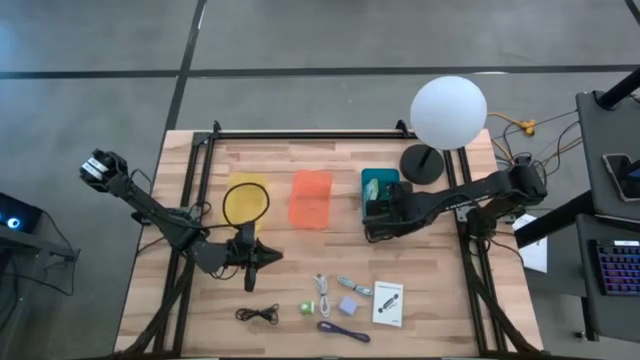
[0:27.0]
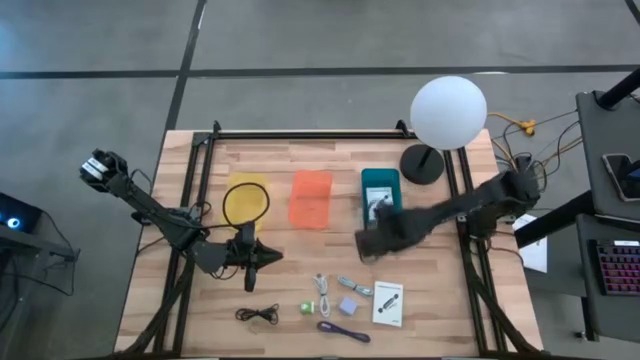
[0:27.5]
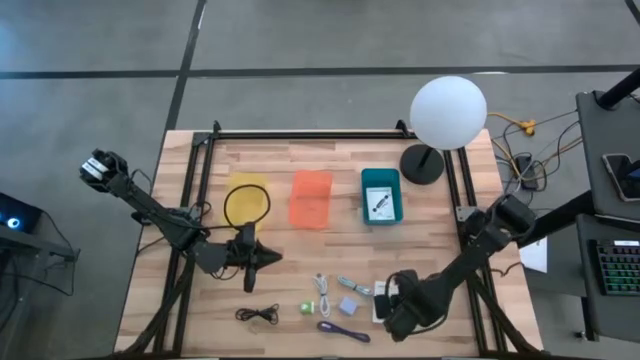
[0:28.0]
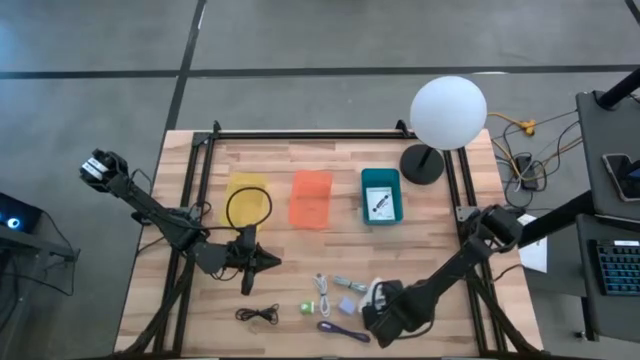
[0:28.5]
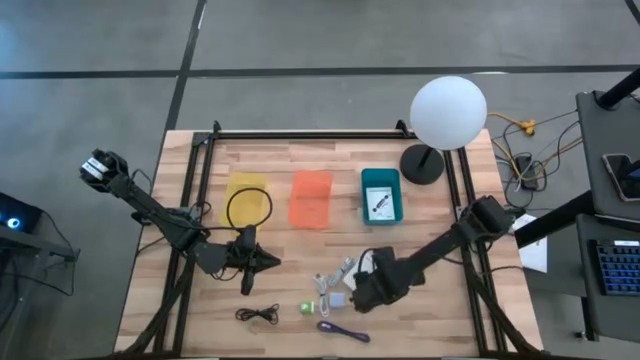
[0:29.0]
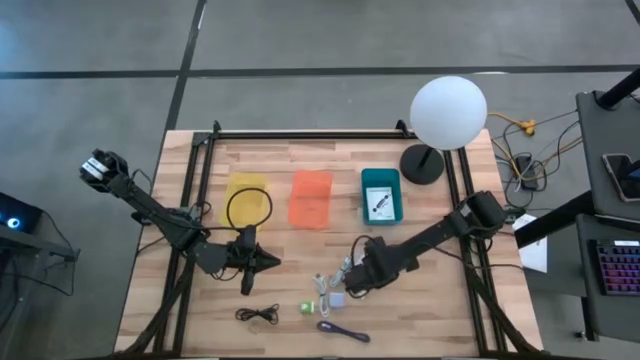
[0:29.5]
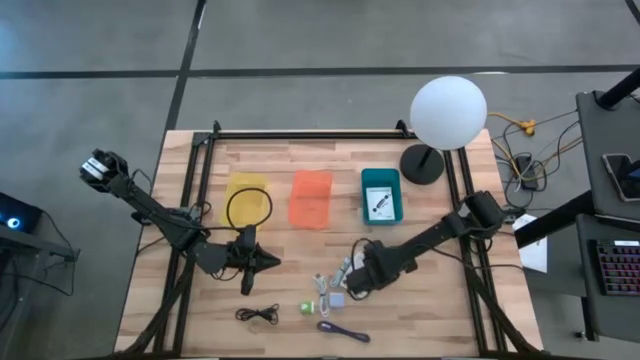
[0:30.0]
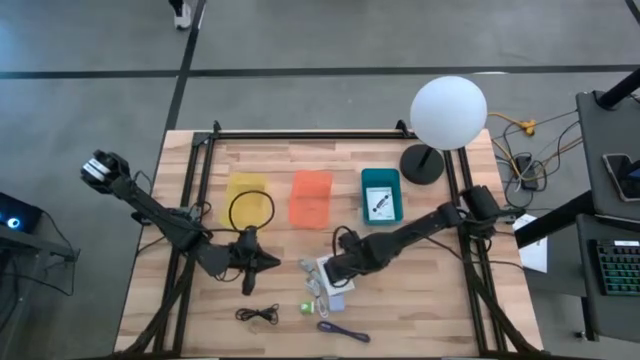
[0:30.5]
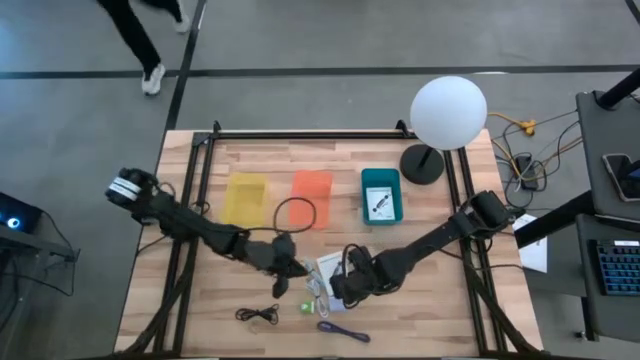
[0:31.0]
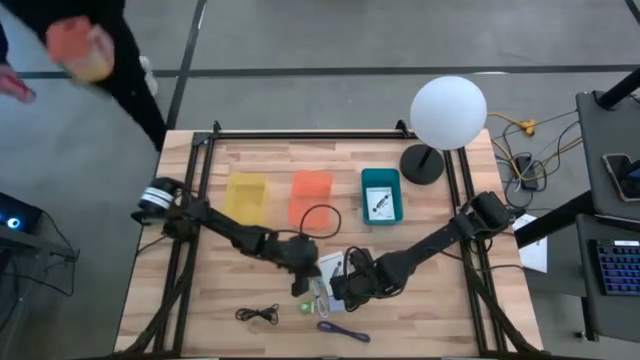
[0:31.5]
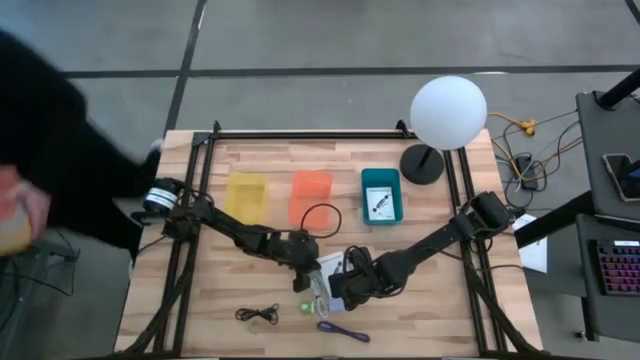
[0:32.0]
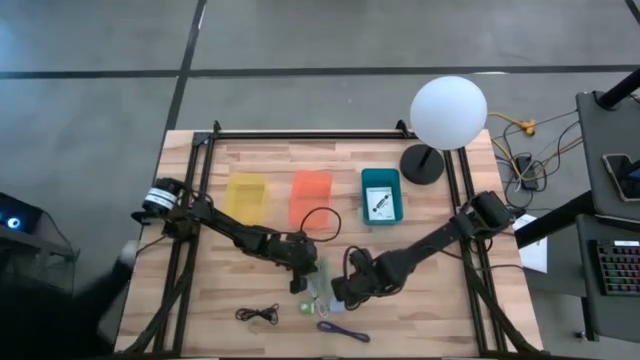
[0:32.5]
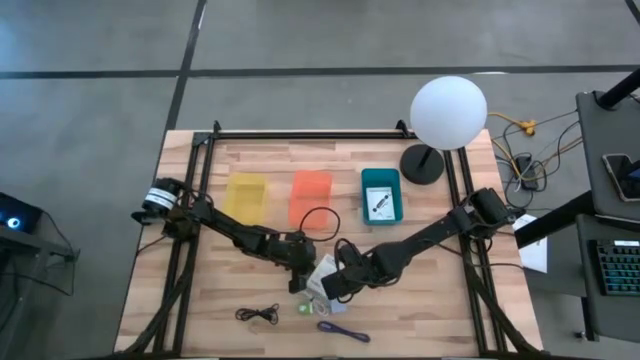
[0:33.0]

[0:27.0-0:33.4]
Task: Pick and place items into bin
Put the white card reader box into the blue bin

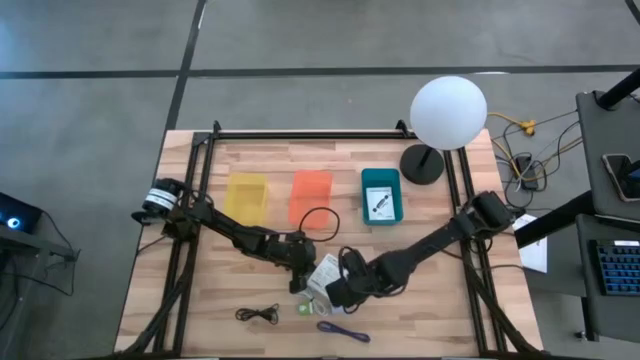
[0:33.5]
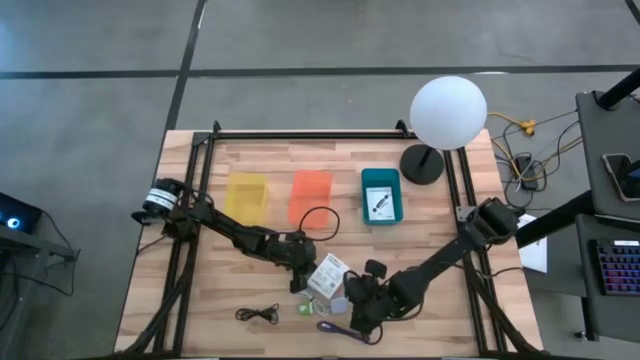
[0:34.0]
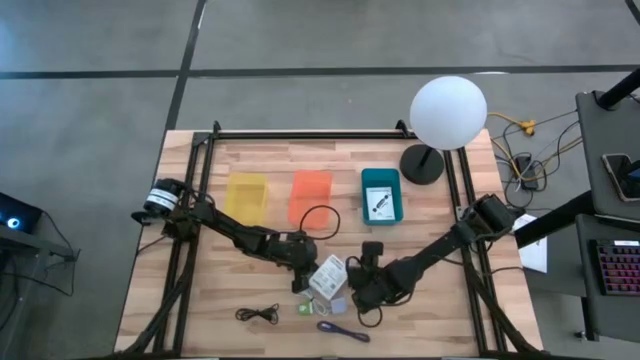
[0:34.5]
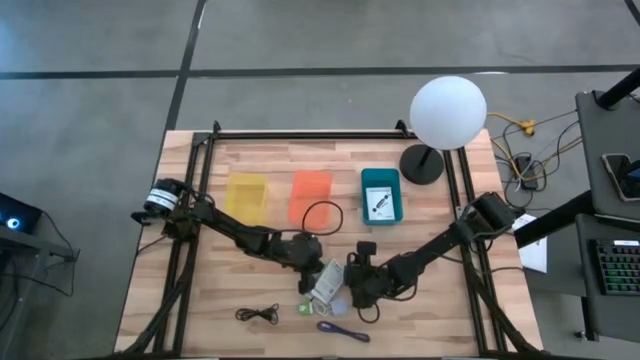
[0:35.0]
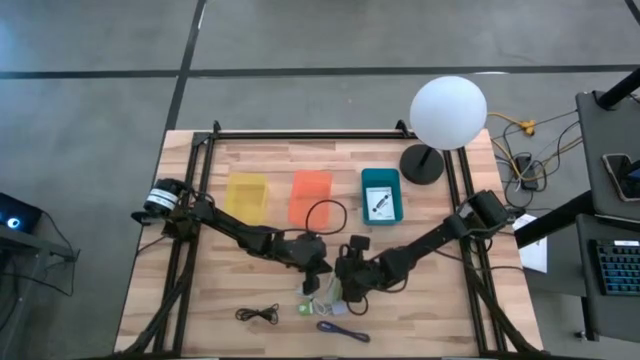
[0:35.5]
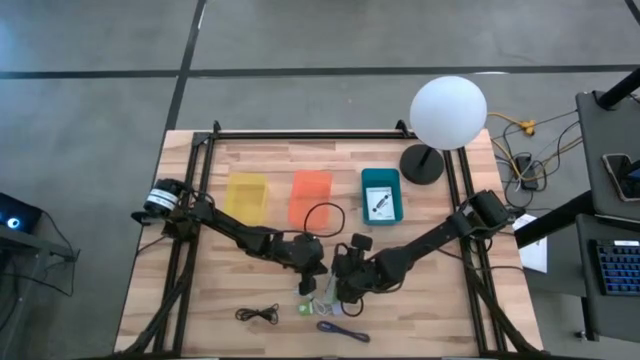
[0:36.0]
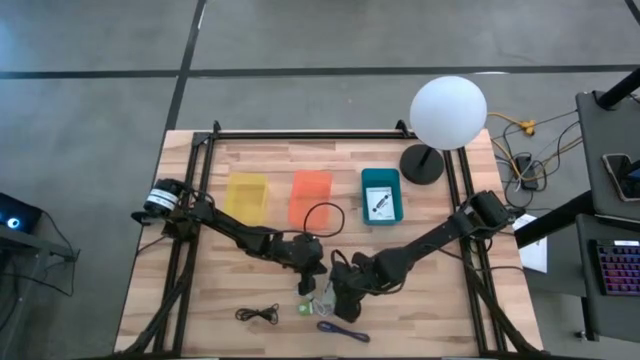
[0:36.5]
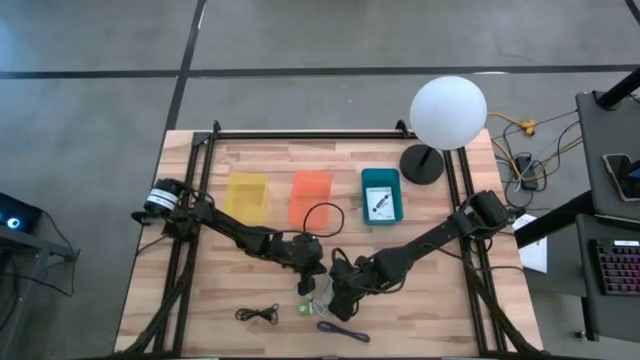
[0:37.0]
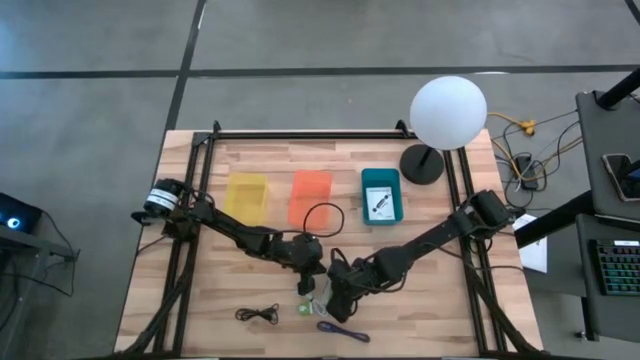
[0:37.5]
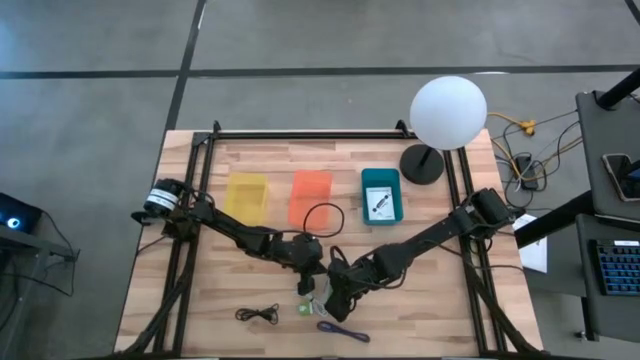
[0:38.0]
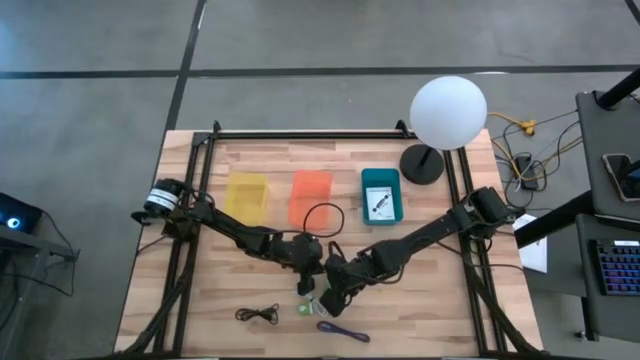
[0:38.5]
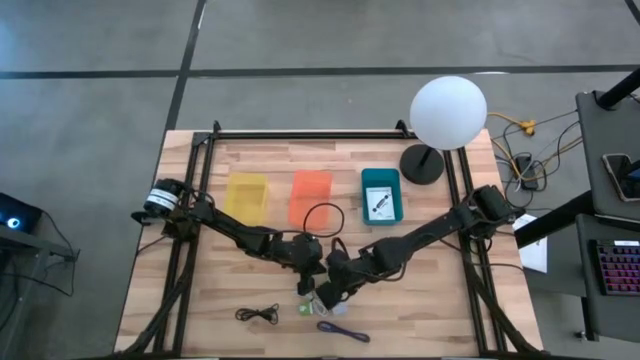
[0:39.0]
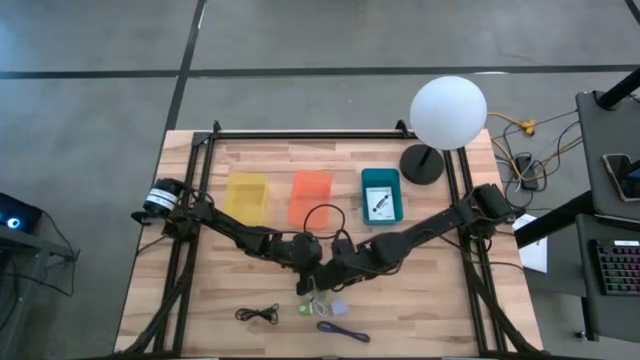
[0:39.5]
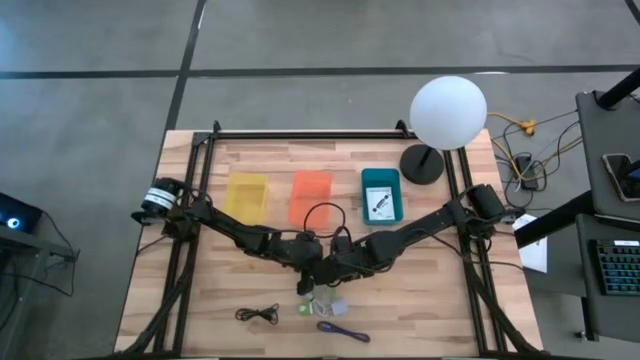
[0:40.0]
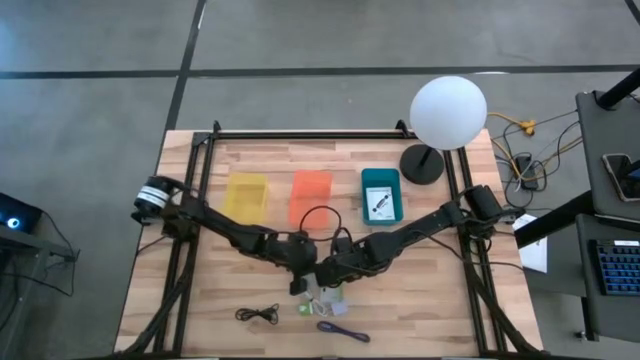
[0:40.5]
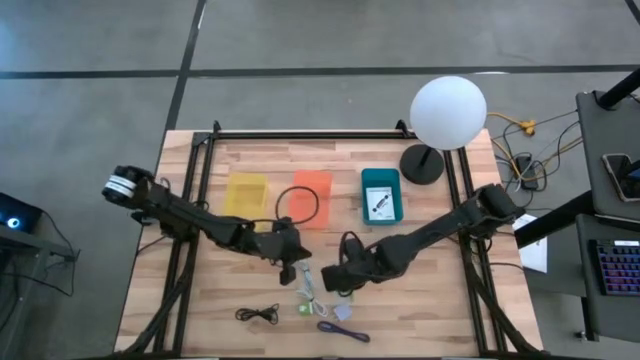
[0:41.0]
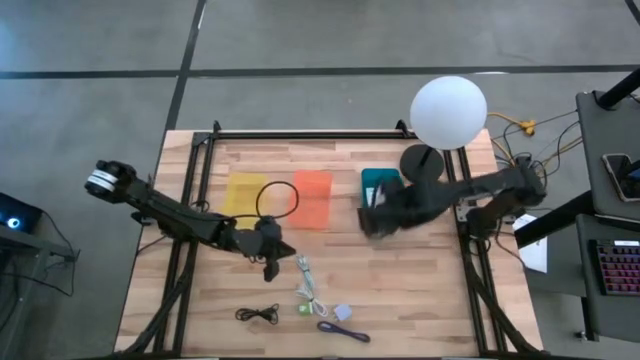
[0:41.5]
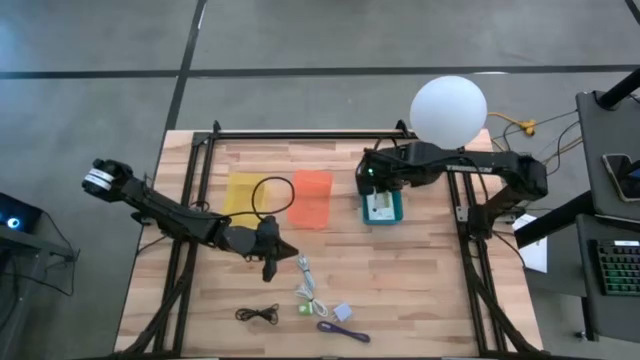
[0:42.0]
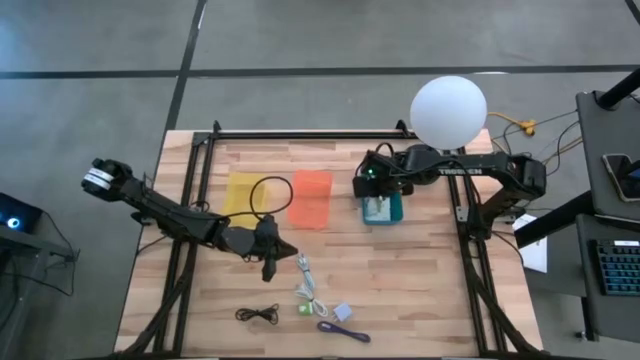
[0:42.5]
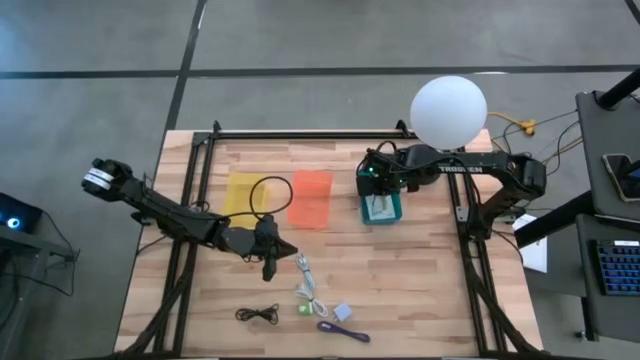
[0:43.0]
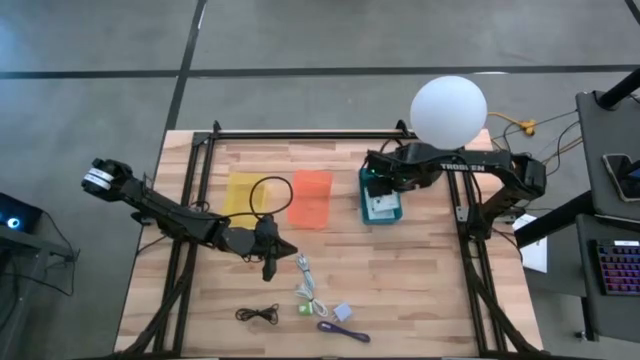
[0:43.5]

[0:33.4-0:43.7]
Put the white card reader box into the blue bin

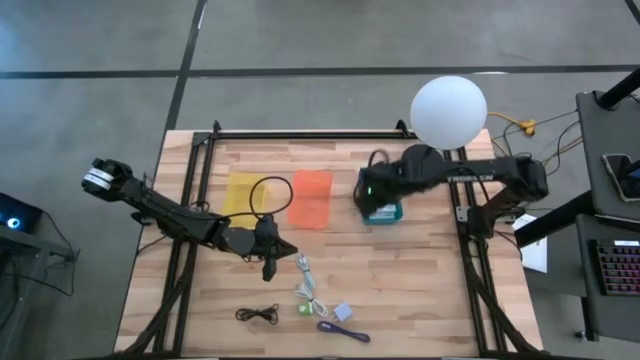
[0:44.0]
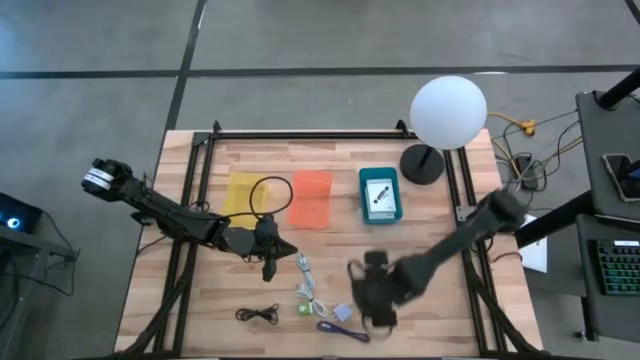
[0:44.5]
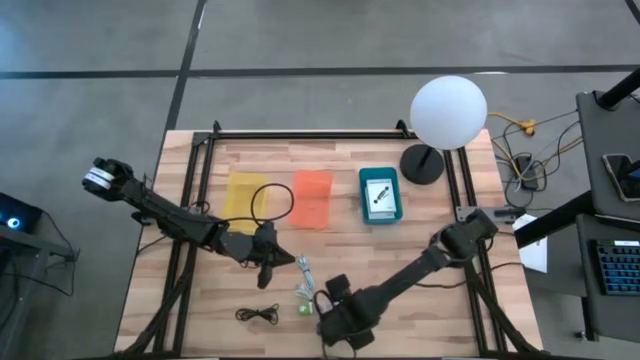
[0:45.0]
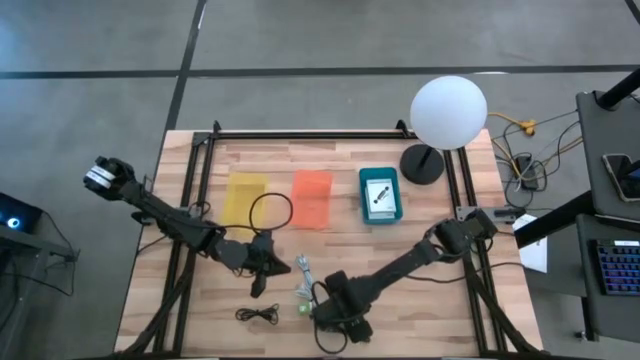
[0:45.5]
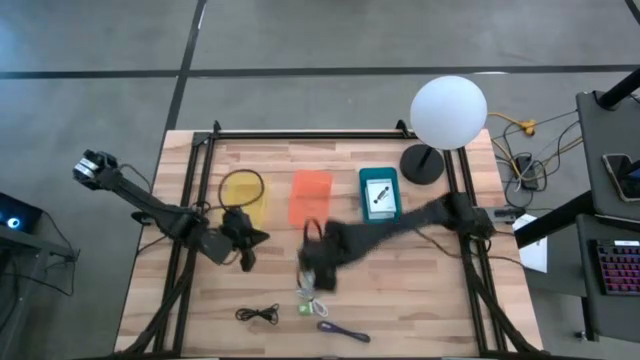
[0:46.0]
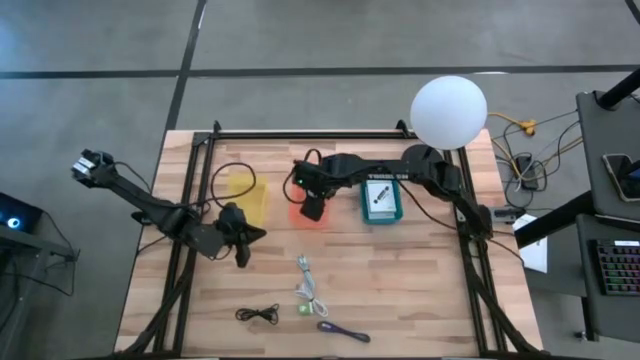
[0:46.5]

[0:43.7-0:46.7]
Put the white charger adapter into the orange bin

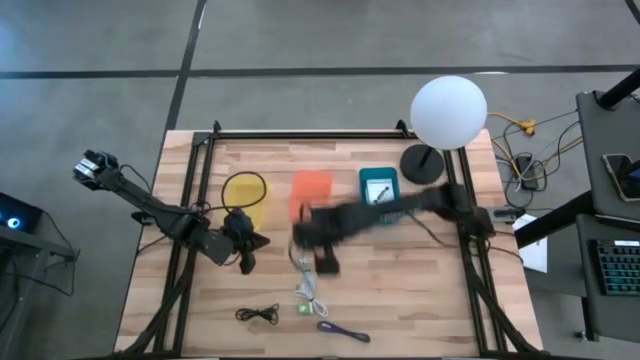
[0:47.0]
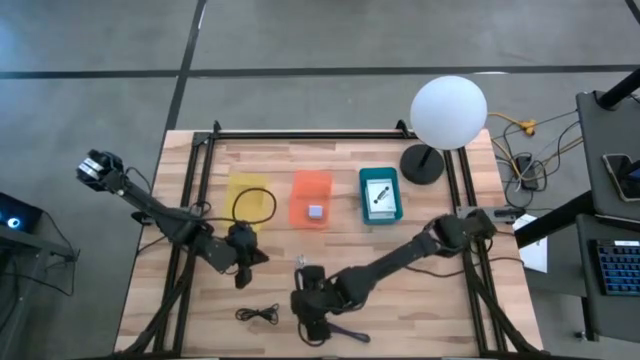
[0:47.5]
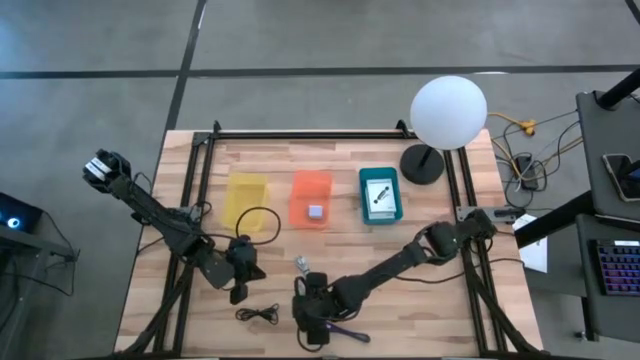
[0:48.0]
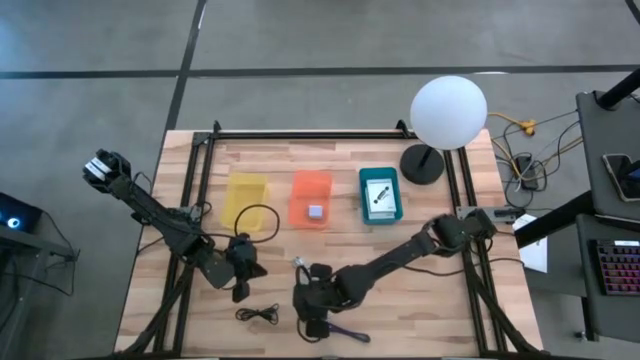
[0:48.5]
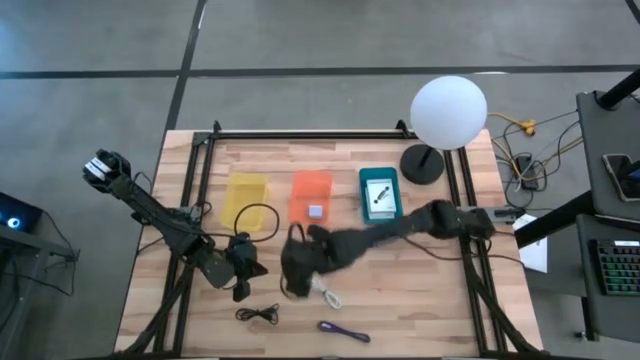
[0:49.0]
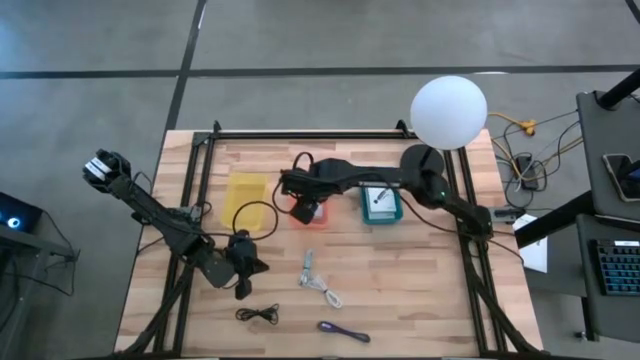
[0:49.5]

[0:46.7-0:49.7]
Put the green charger adapter into the orange bin
